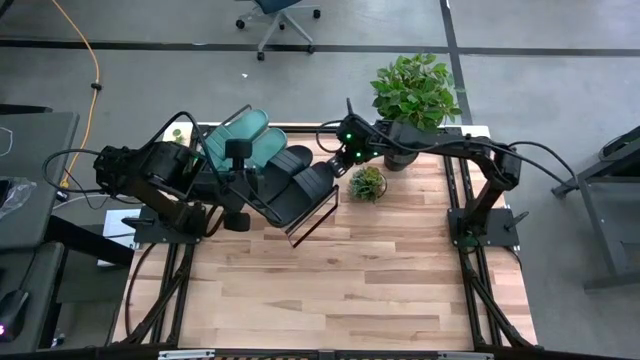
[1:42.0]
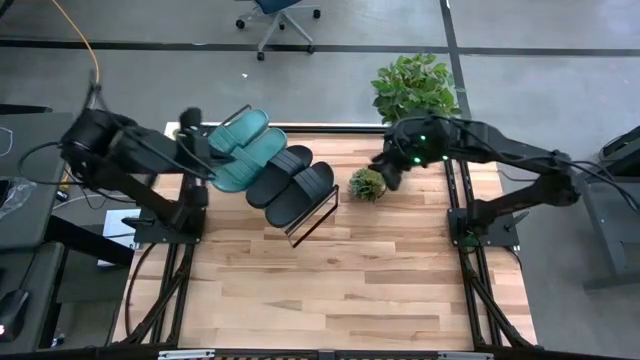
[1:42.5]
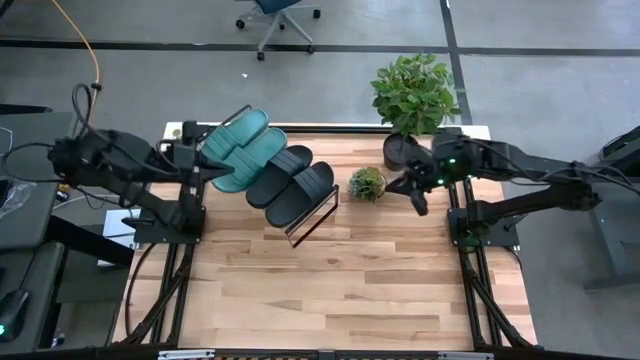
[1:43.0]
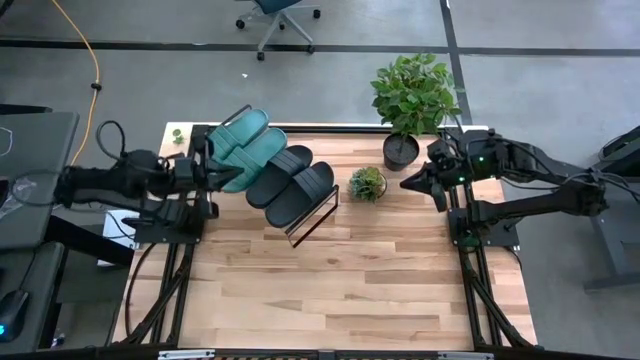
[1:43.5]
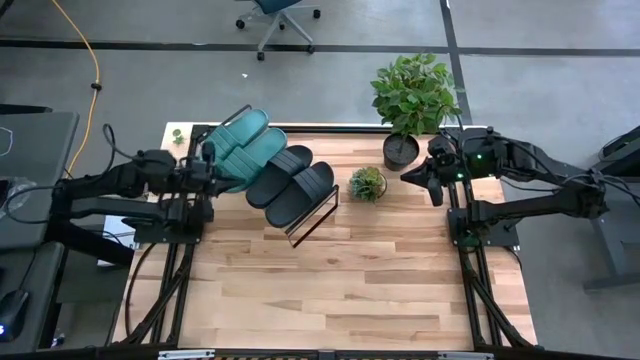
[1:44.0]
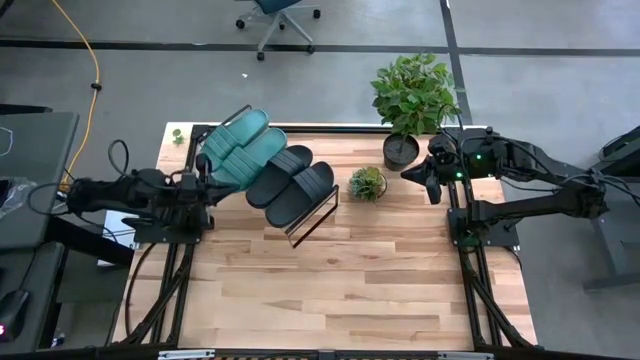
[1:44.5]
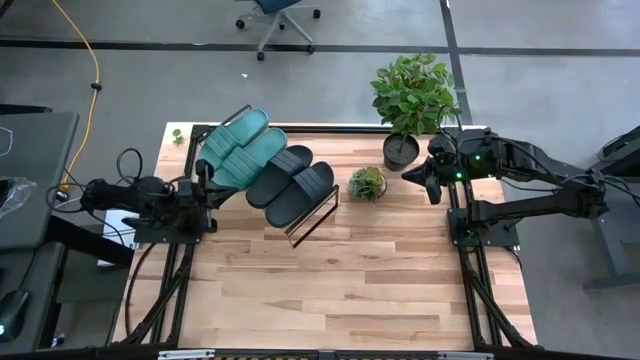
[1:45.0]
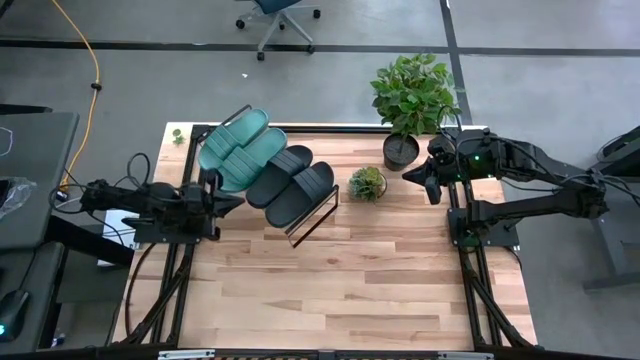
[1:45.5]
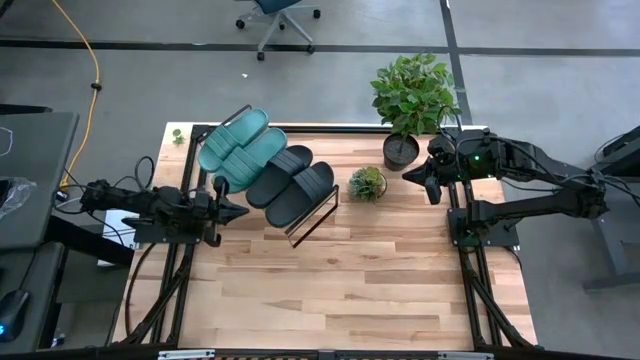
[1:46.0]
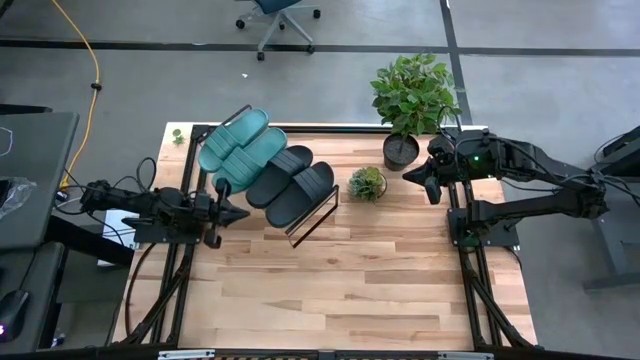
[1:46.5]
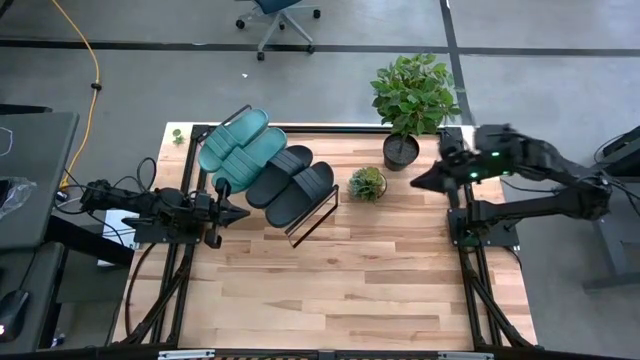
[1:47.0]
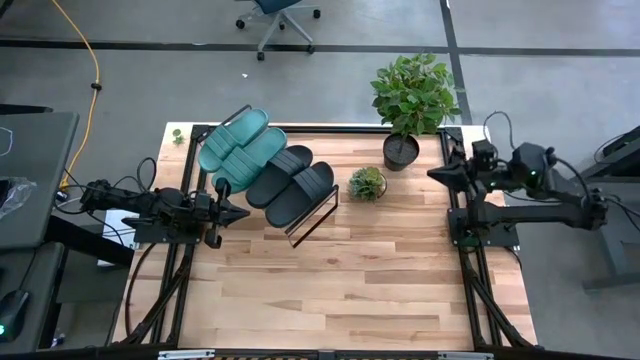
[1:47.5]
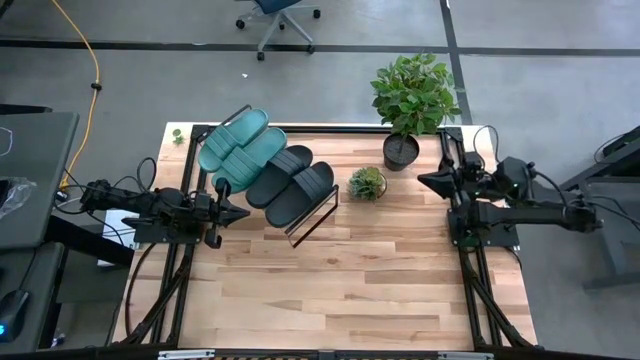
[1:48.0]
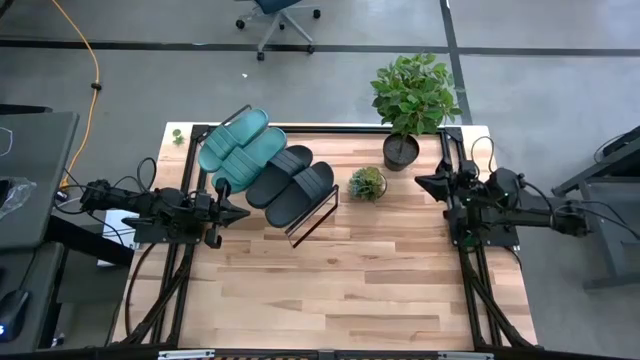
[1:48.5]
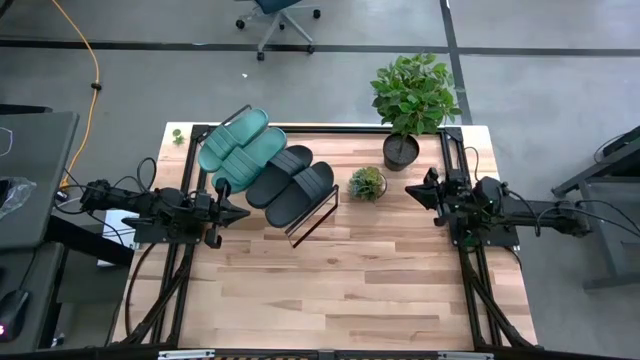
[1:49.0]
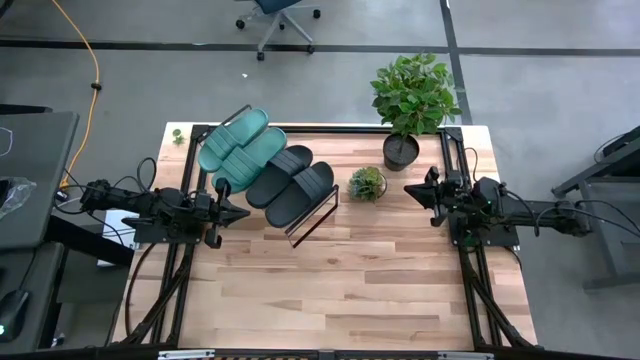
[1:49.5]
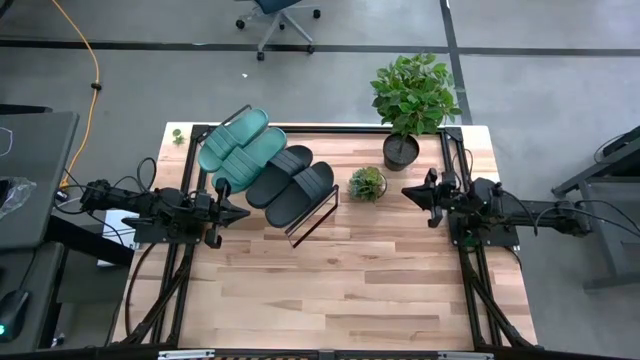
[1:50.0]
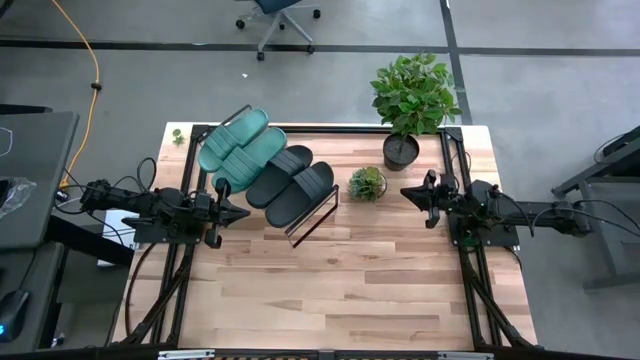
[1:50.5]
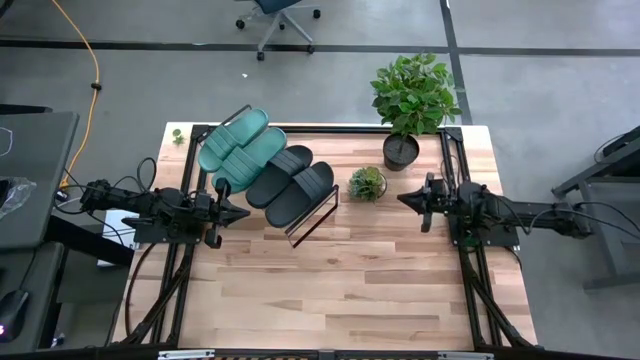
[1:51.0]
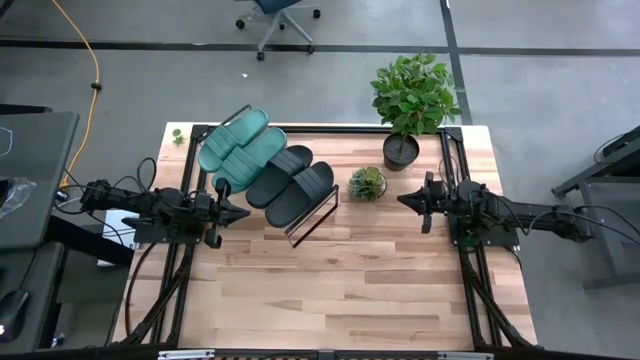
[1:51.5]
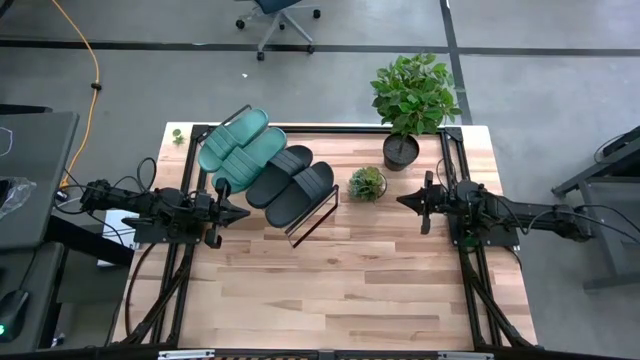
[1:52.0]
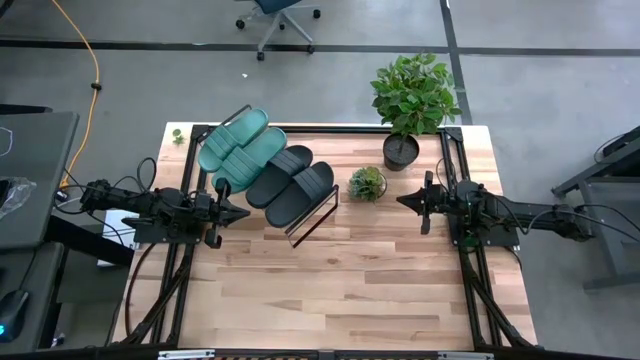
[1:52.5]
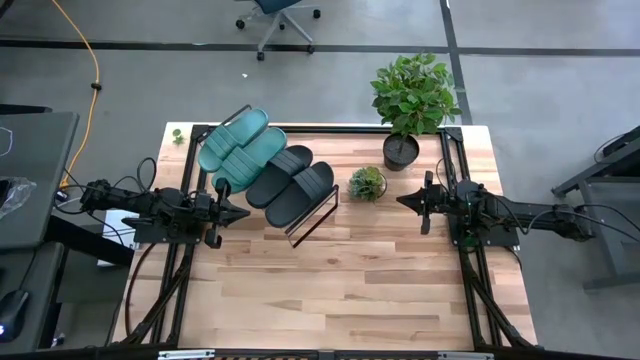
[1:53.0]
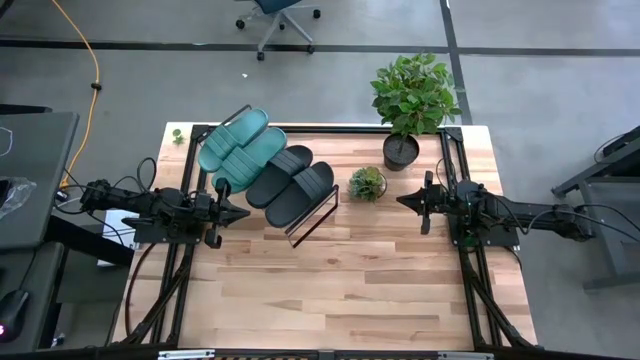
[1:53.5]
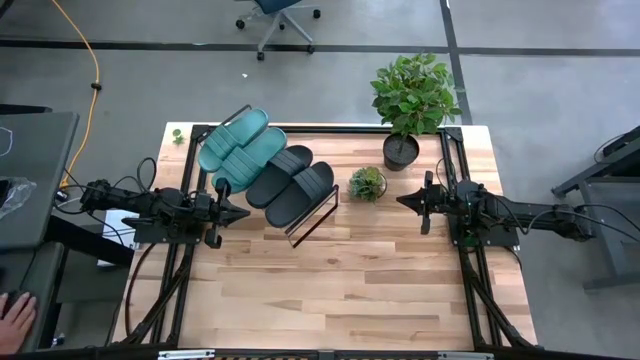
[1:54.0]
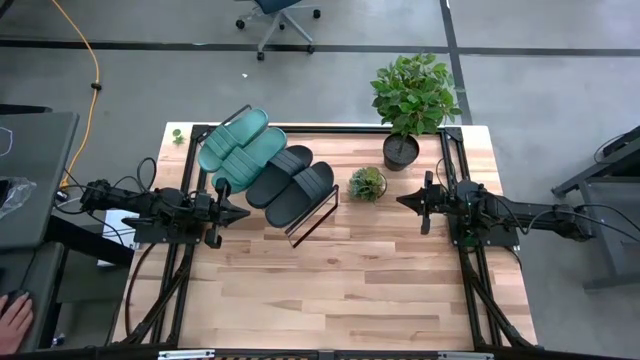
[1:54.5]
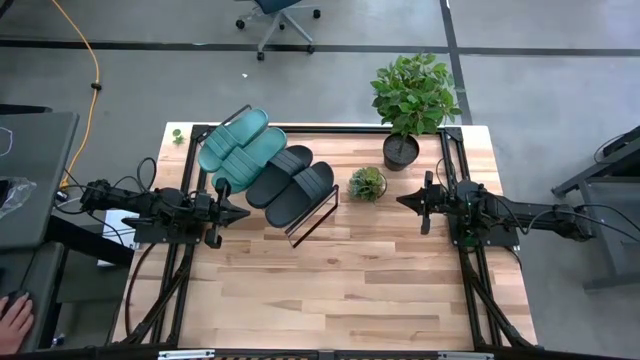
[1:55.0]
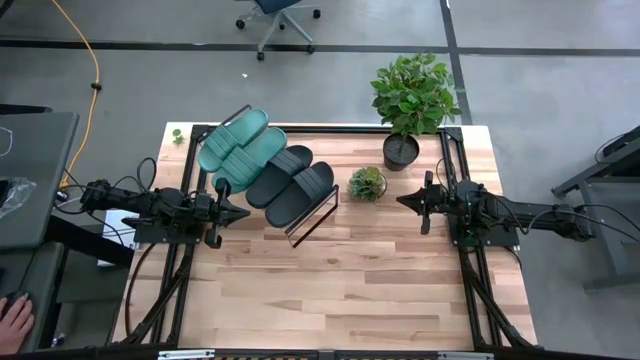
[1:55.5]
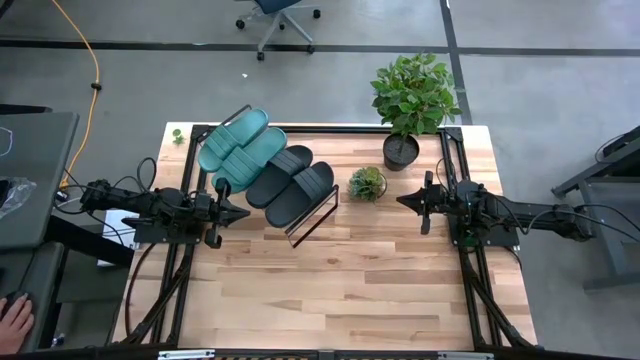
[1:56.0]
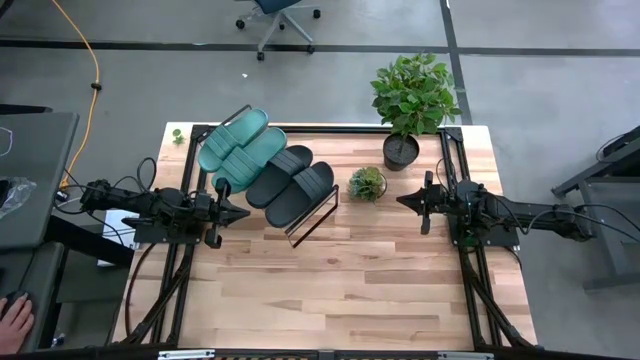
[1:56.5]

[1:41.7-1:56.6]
Task: Pick and place slippers onto the shelf
Return to Home Position

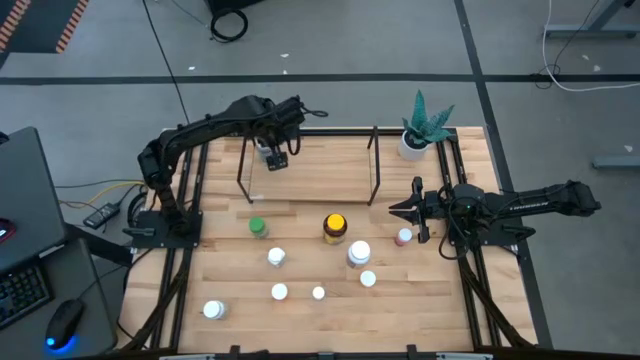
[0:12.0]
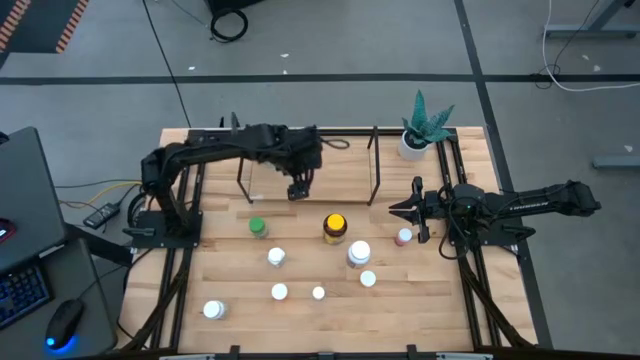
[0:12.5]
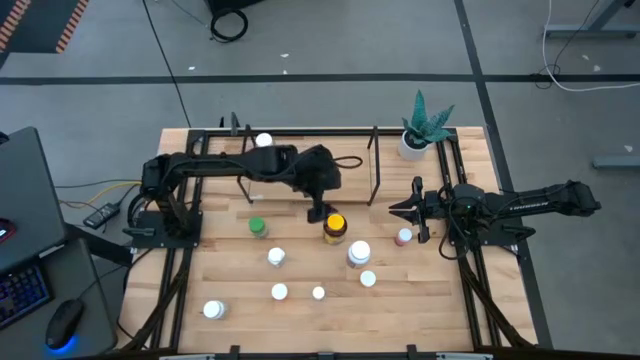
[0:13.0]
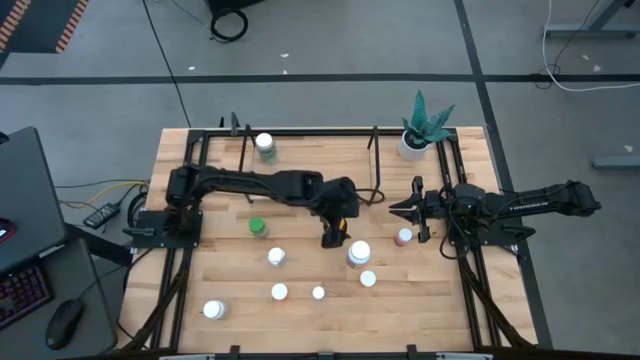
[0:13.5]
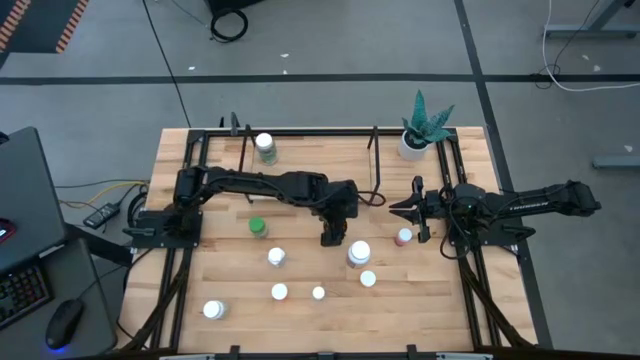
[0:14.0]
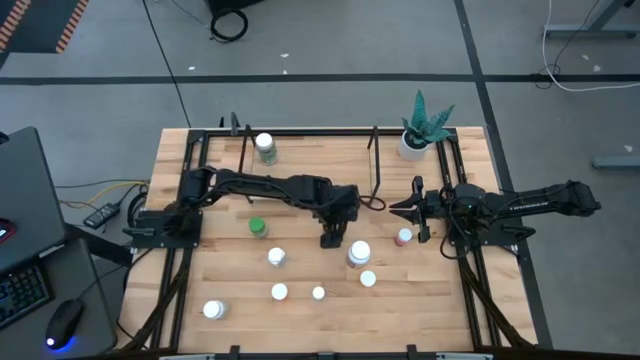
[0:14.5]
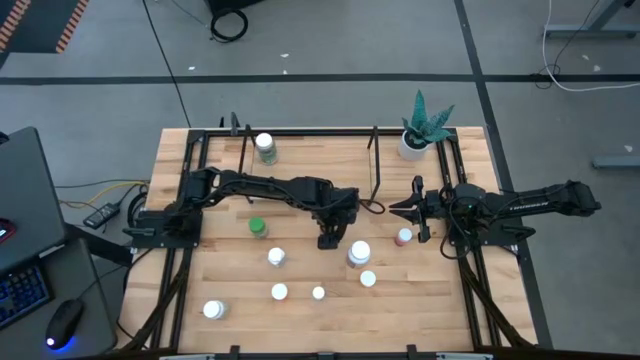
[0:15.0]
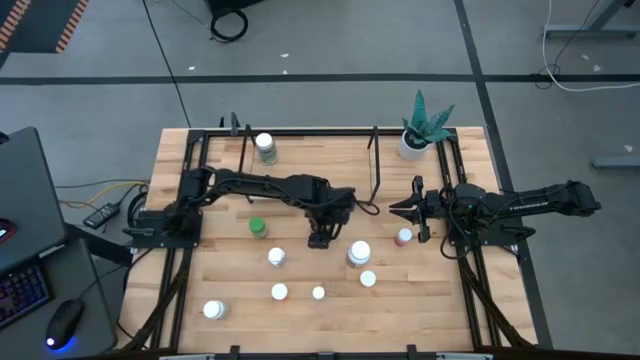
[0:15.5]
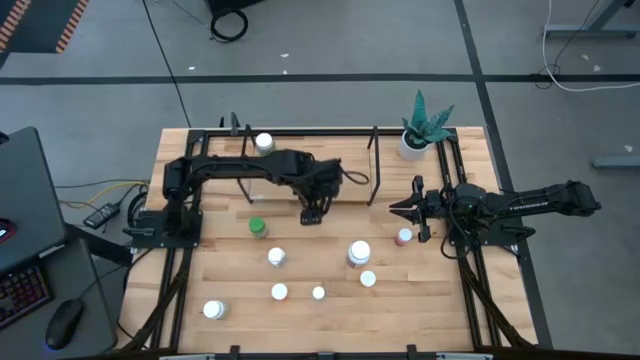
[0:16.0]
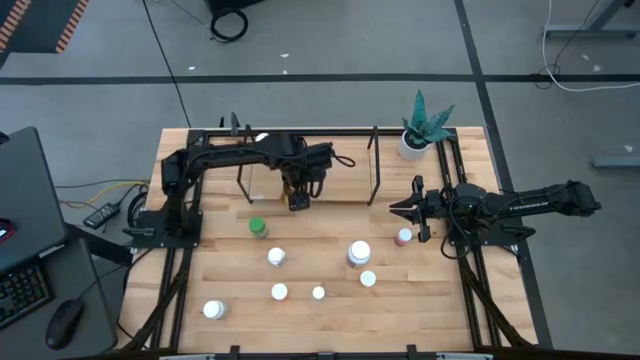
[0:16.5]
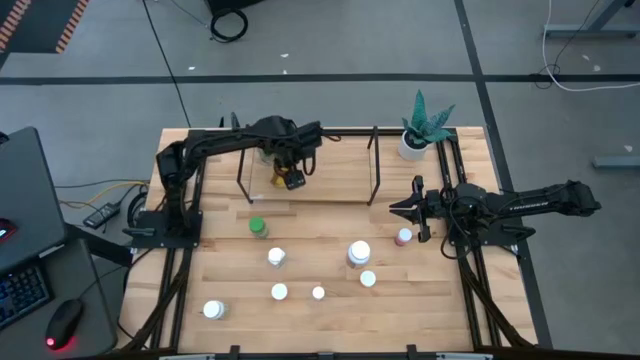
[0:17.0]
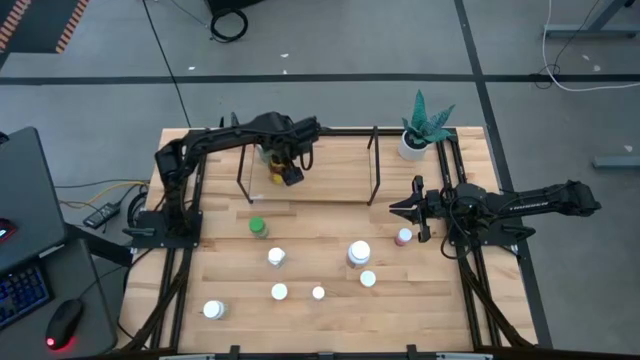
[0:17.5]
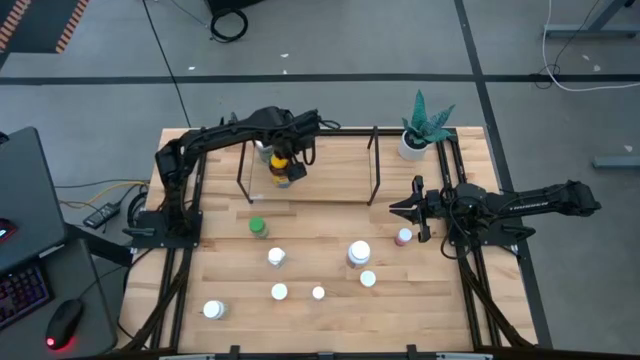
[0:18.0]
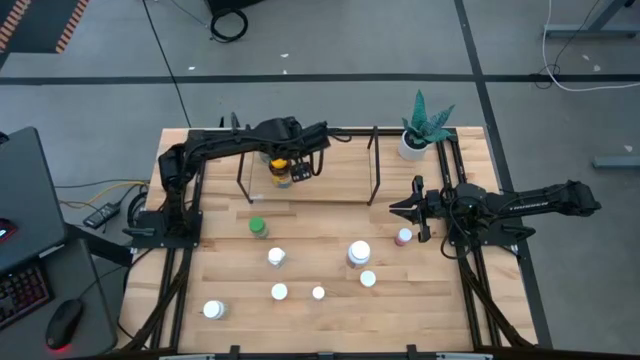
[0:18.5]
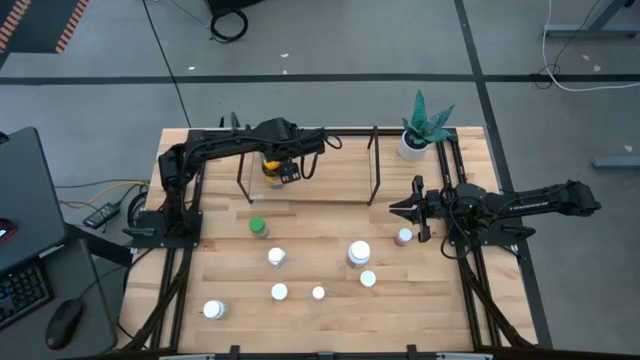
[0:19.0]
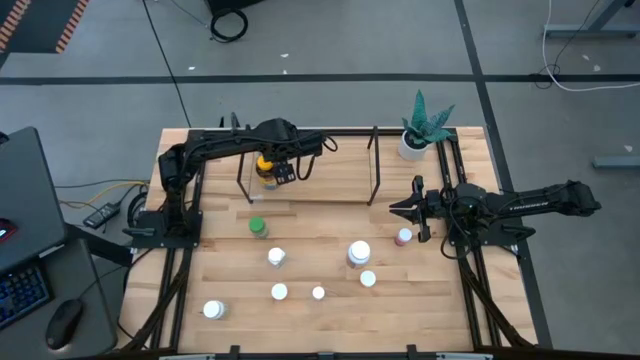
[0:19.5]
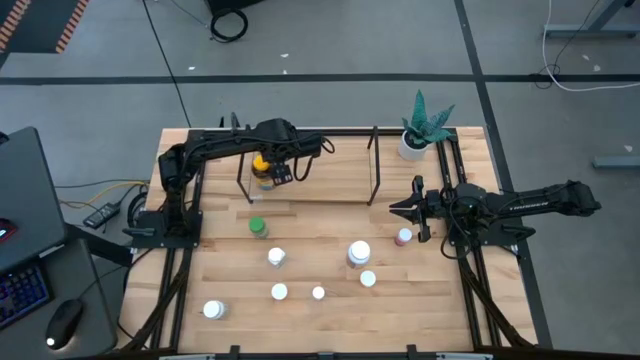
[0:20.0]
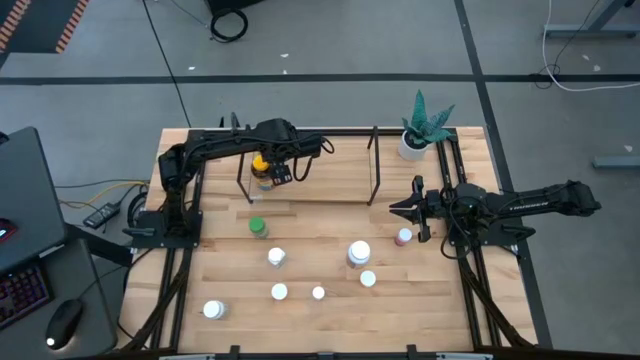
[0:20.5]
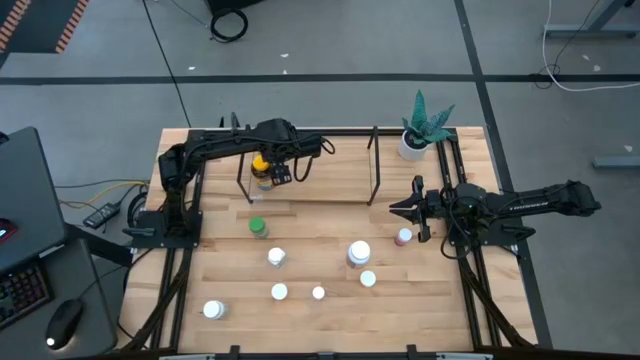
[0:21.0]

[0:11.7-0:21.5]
Task: Pick and place medicine bottles onto shelf by color
Put the top yellow pill bottle on the shelf aligned with the other transparent pill bottles
